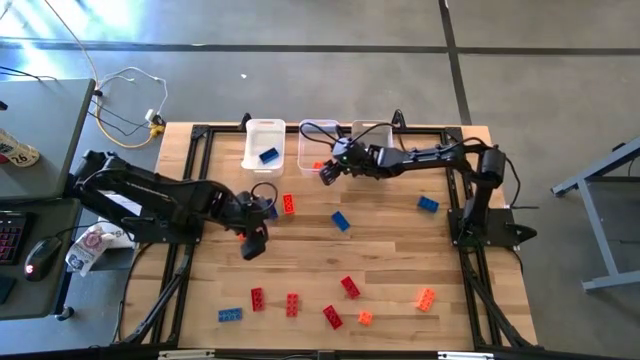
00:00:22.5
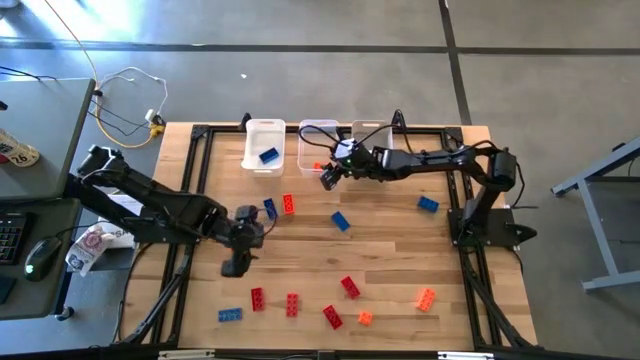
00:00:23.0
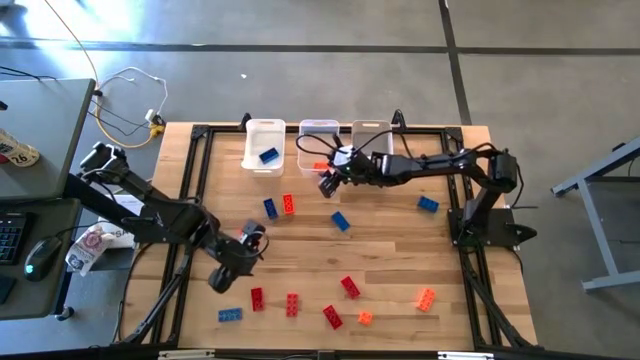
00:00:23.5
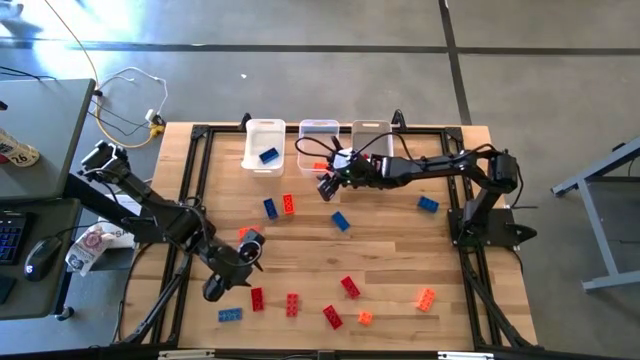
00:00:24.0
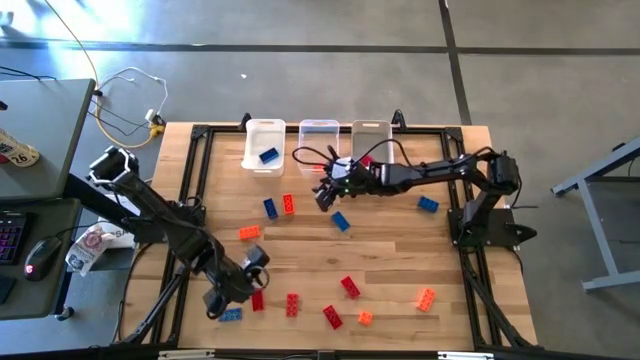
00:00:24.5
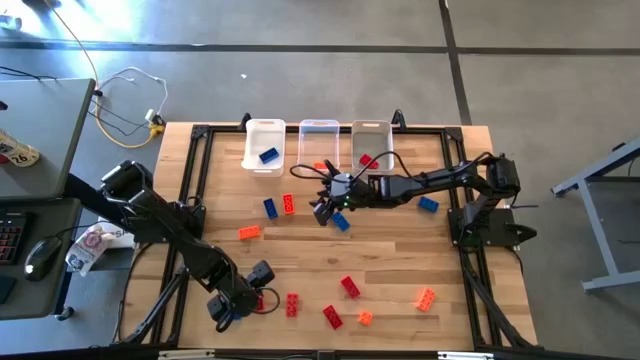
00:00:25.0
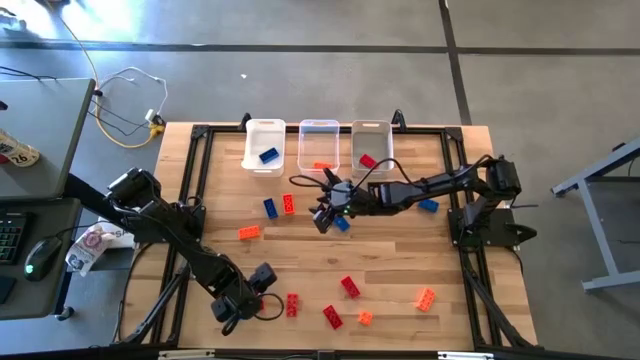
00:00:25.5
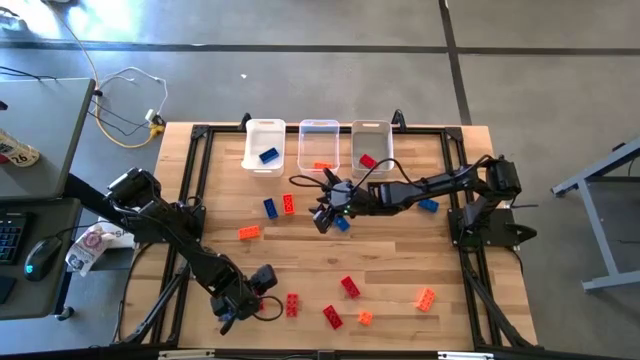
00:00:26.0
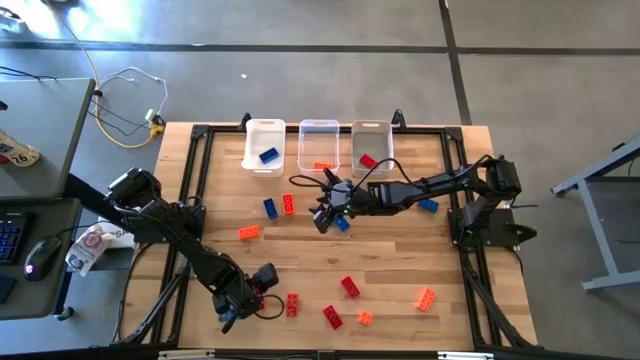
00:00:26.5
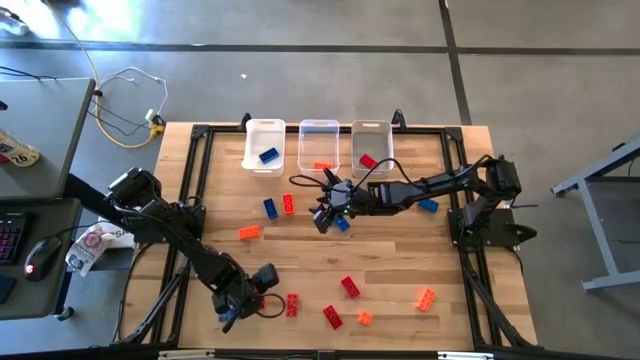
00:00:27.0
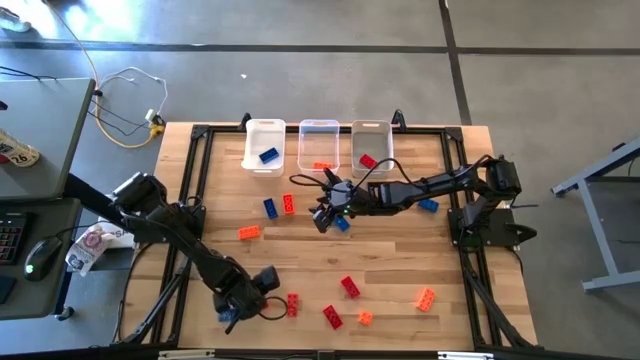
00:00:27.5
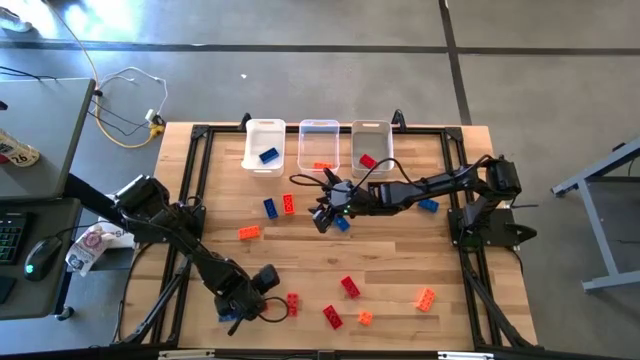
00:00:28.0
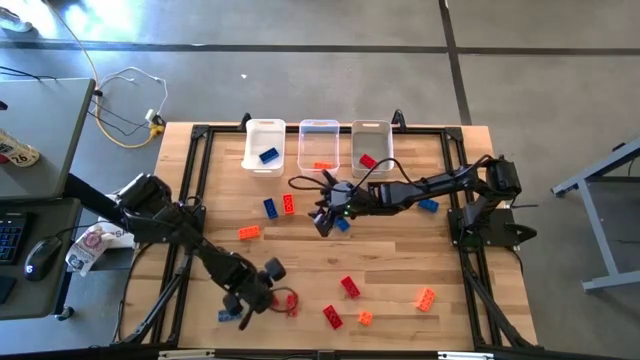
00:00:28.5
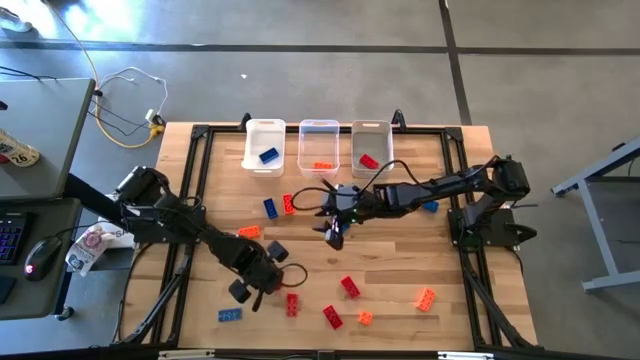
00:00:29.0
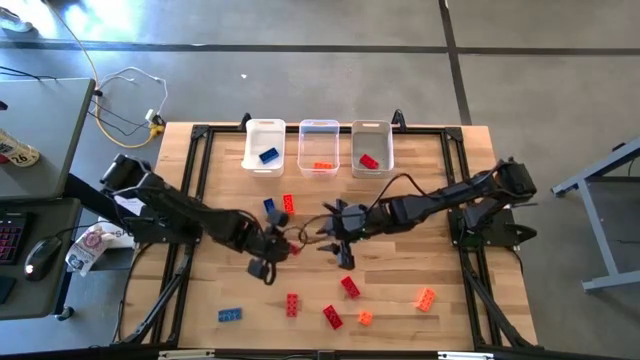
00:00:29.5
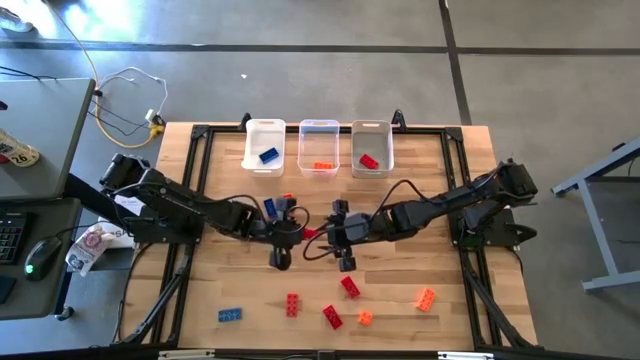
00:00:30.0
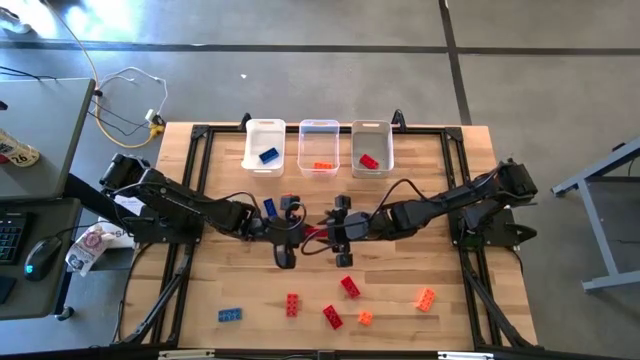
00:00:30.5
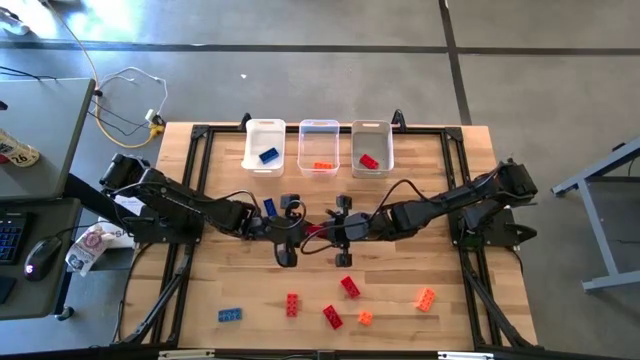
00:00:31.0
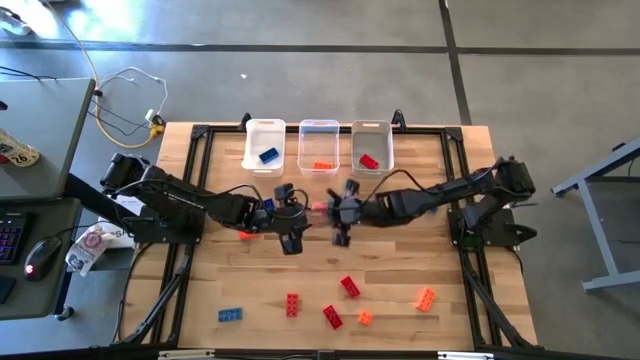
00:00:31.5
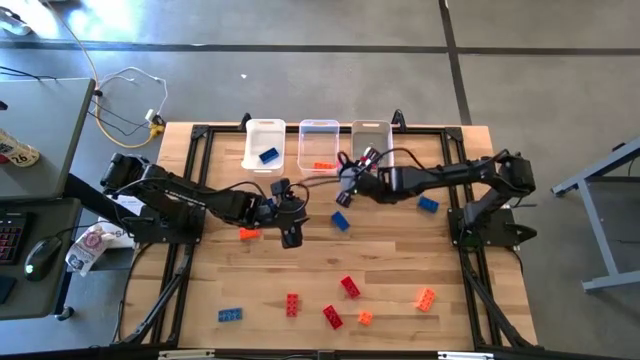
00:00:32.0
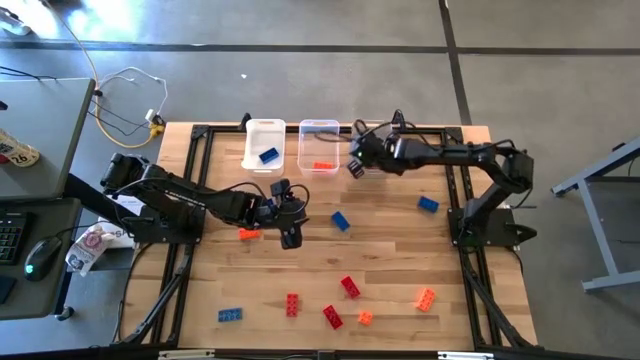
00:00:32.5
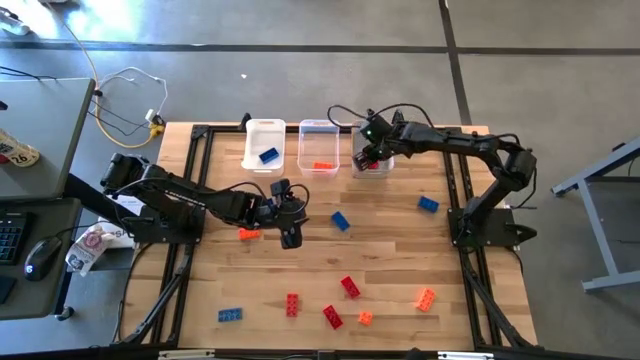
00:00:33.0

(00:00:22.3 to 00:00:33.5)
Task: Sort & place blocks by color
Put the red game piece into the gray bin

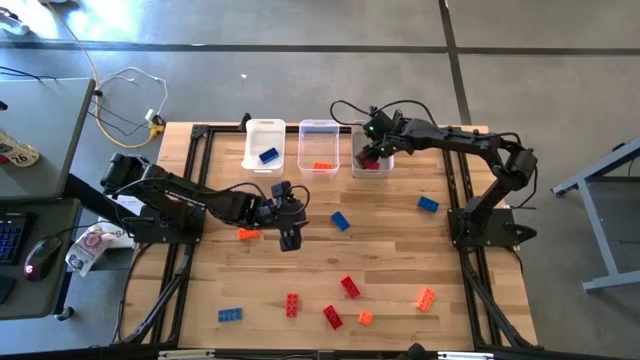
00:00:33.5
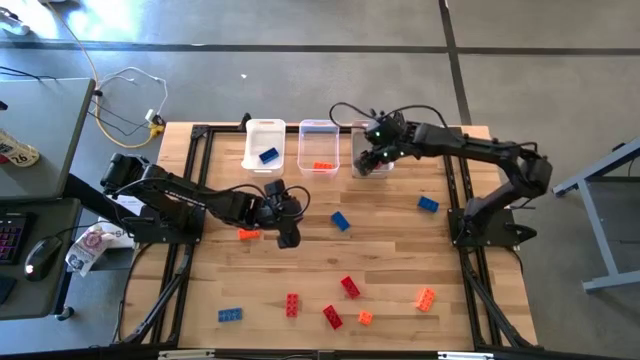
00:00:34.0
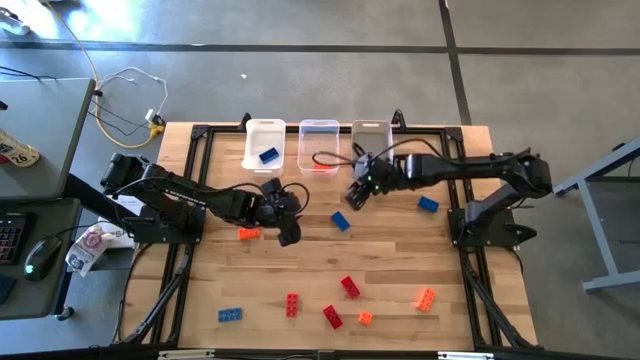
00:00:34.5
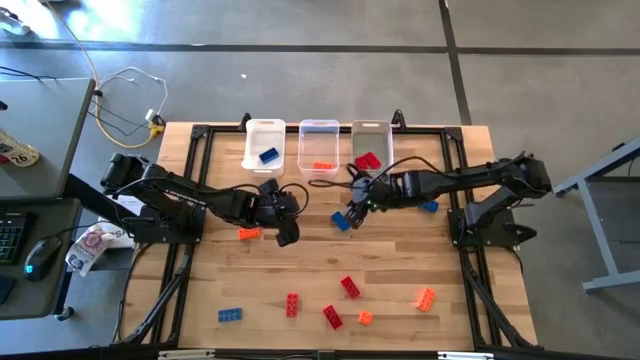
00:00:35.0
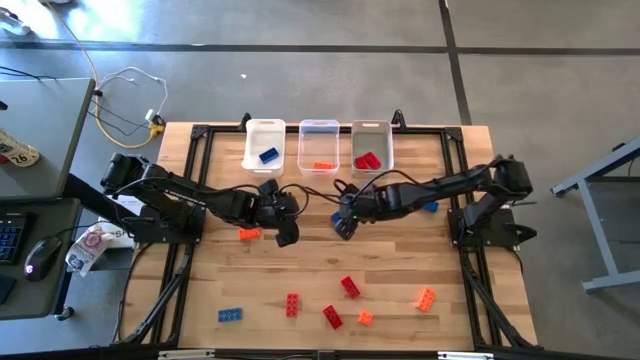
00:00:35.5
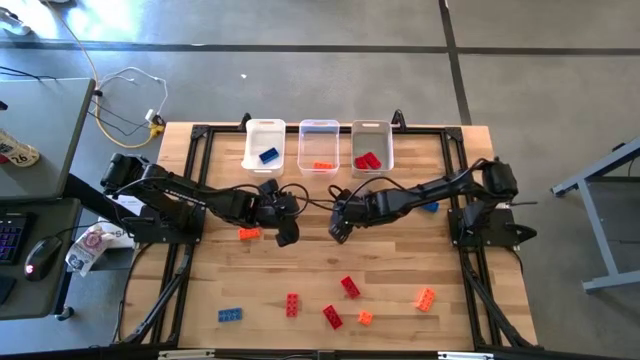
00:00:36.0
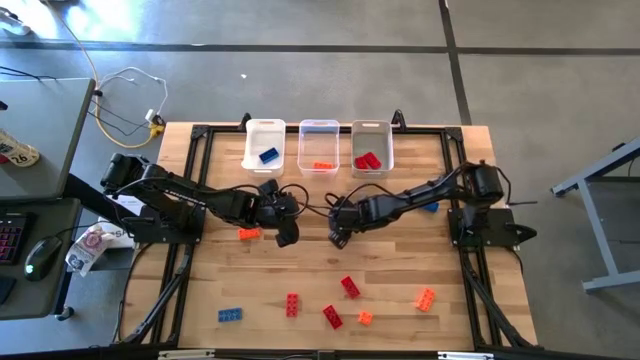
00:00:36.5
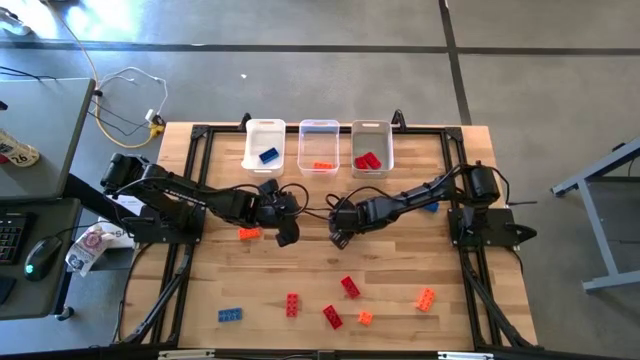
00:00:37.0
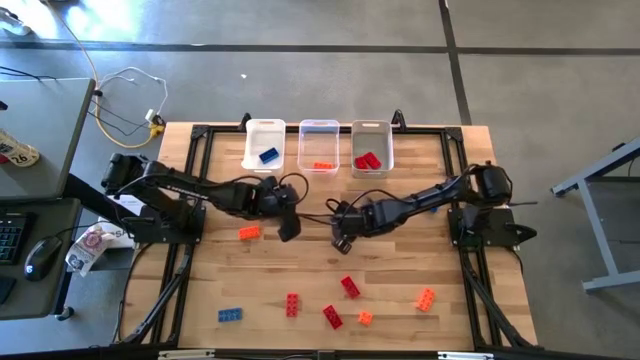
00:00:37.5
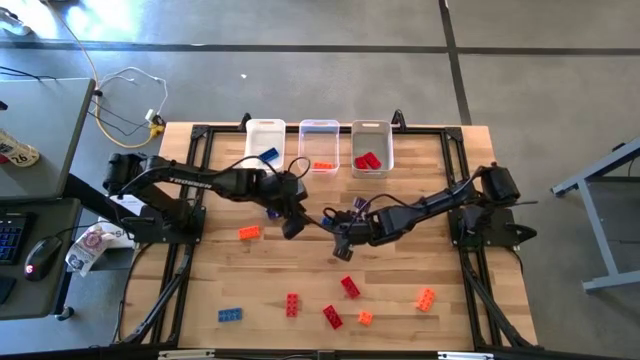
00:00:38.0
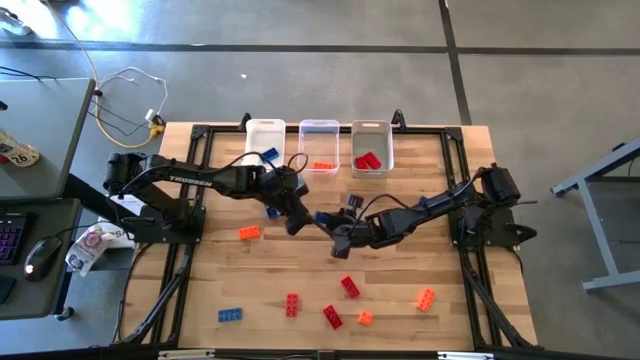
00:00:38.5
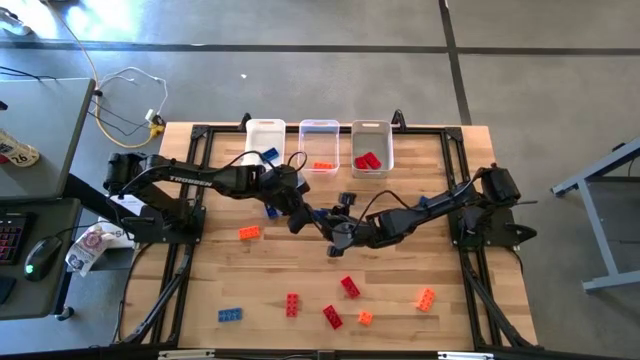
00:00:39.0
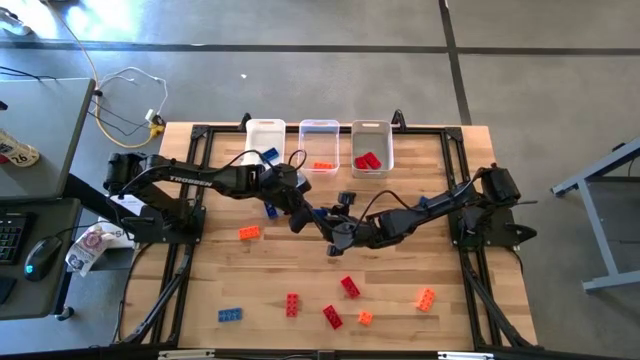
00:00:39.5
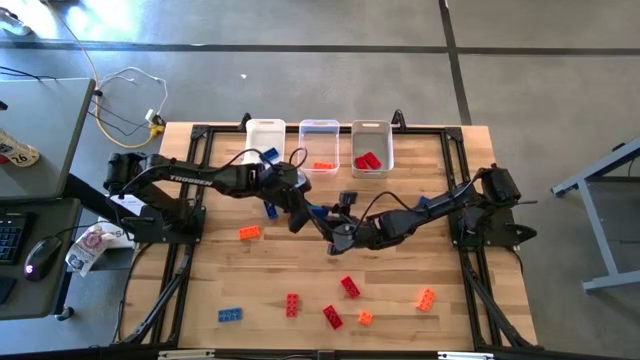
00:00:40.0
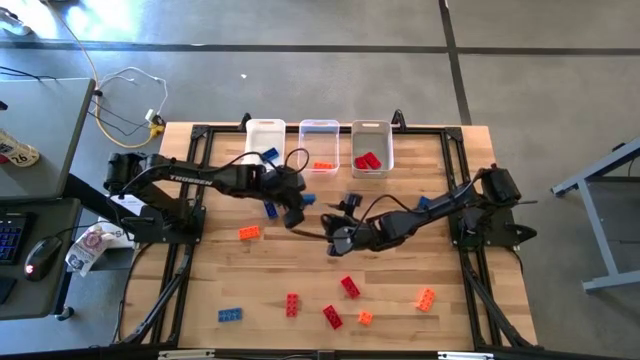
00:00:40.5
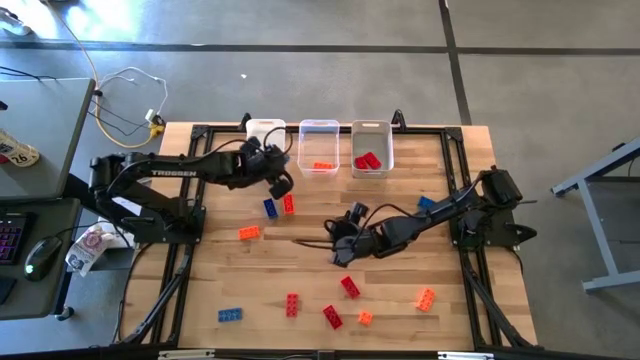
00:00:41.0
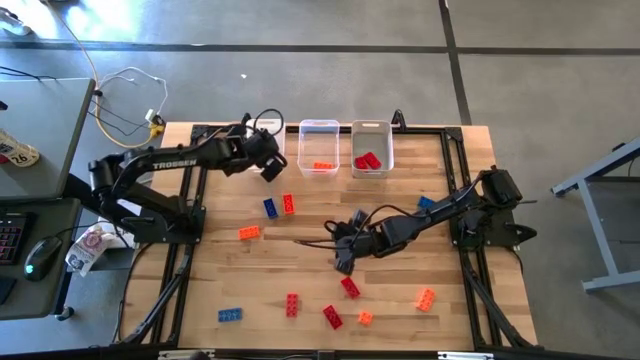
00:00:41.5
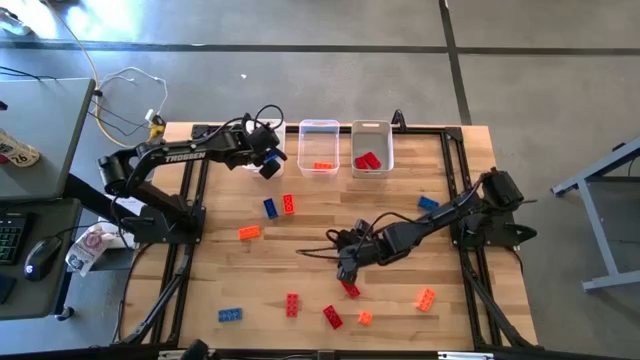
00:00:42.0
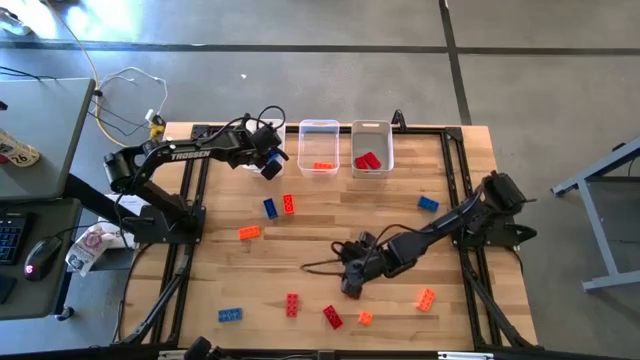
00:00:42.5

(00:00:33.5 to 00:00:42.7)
Put the blue game piece into the white bin

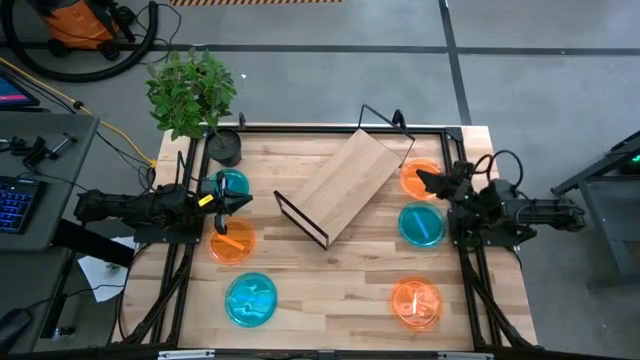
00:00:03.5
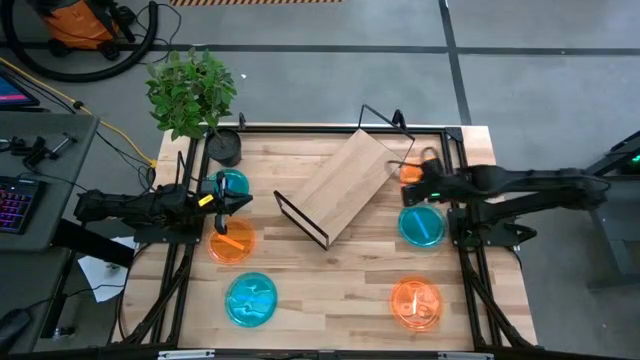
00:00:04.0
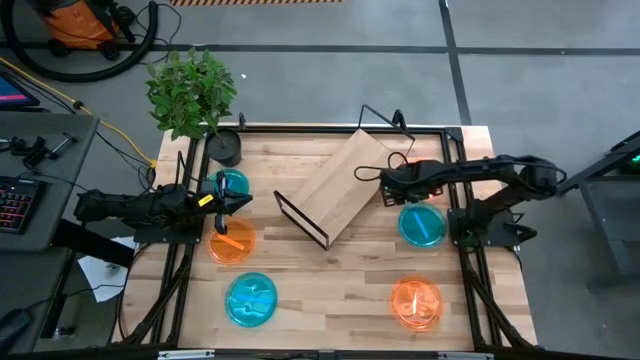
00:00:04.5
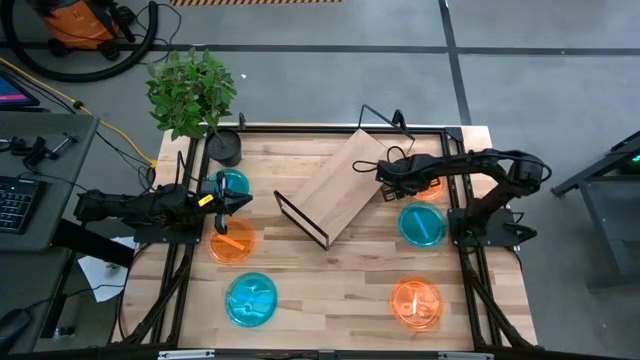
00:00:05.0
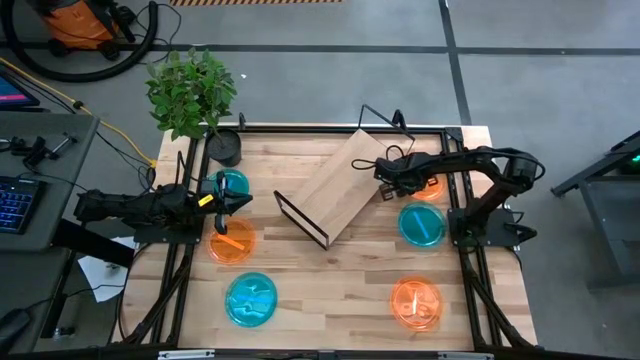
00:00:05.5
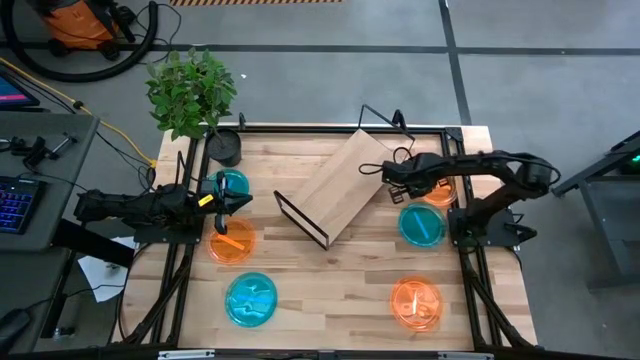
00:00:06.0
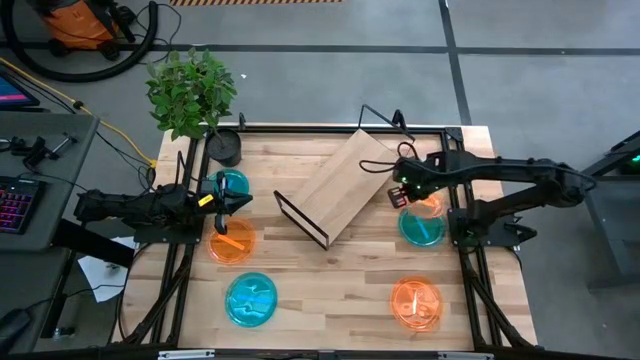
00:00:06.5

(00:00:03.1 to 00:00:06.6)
Task: Place and stack plates onto a shelf
Put the top right orange plate on the shelf
